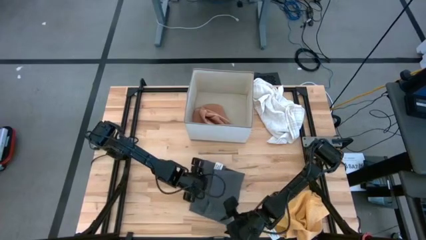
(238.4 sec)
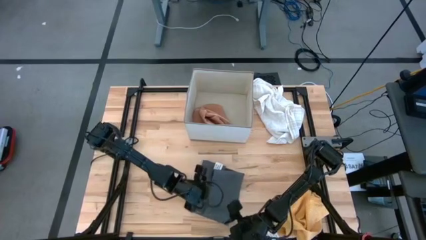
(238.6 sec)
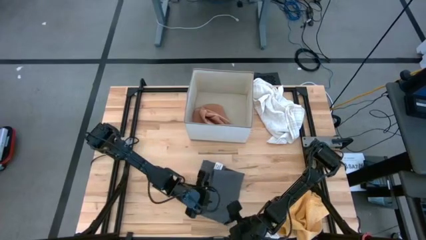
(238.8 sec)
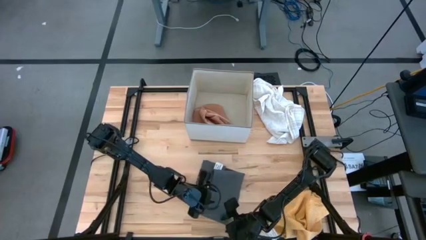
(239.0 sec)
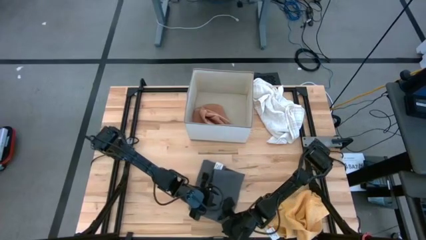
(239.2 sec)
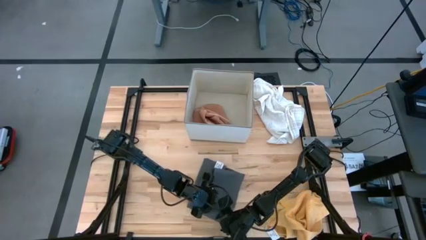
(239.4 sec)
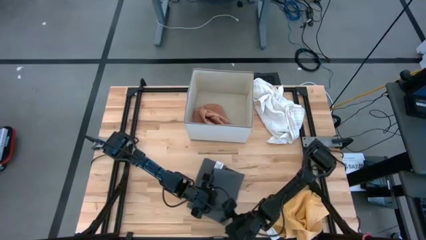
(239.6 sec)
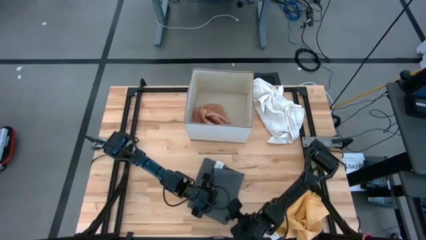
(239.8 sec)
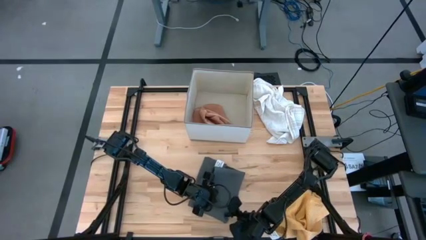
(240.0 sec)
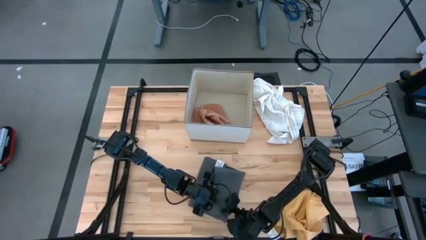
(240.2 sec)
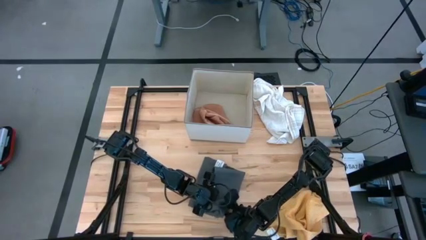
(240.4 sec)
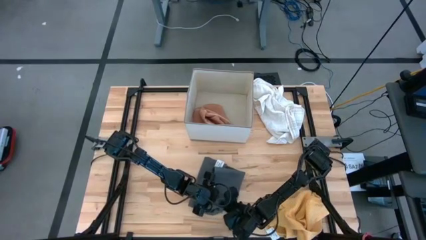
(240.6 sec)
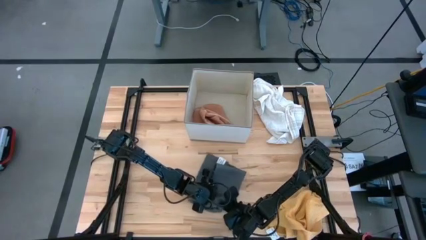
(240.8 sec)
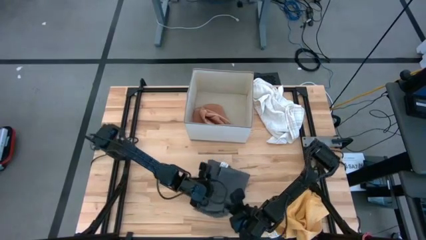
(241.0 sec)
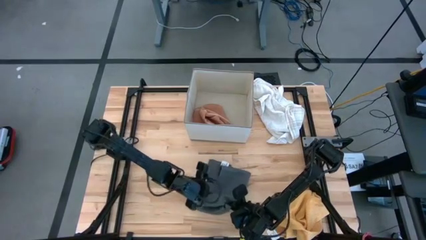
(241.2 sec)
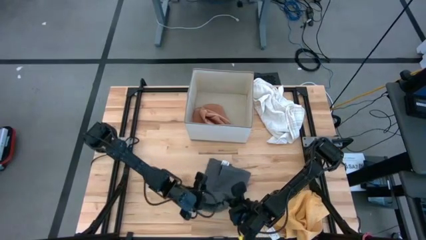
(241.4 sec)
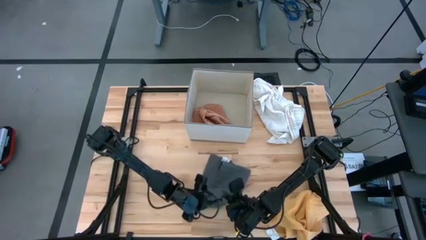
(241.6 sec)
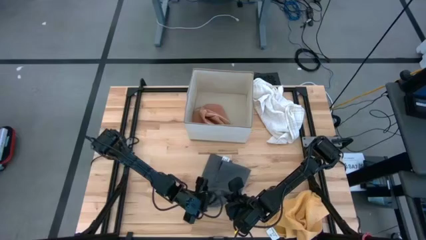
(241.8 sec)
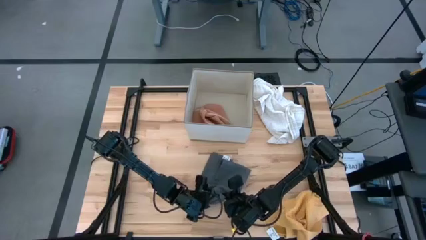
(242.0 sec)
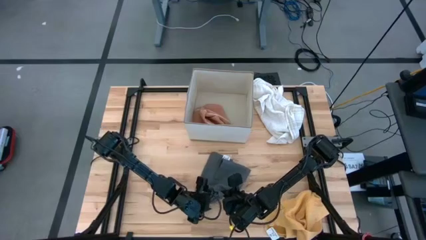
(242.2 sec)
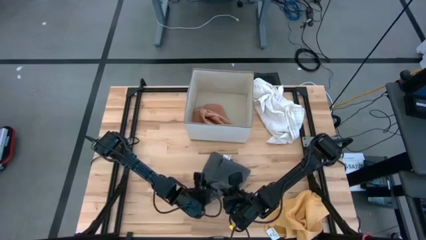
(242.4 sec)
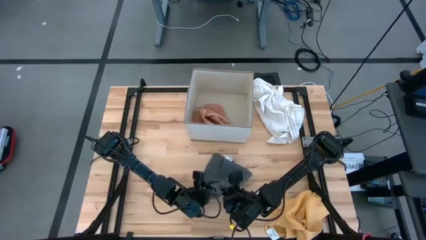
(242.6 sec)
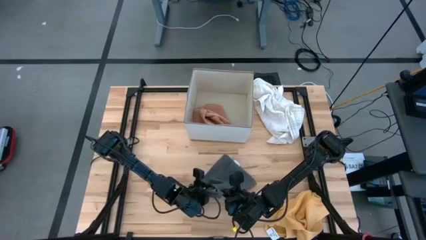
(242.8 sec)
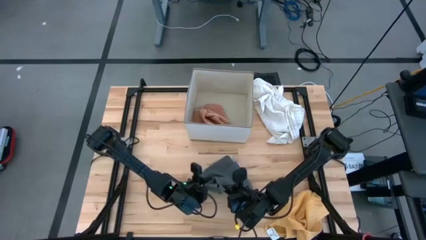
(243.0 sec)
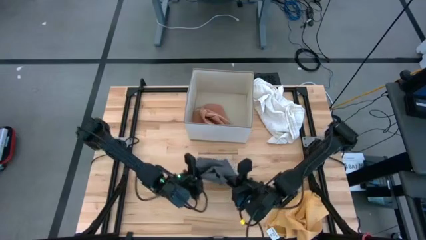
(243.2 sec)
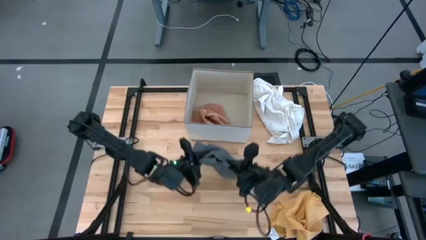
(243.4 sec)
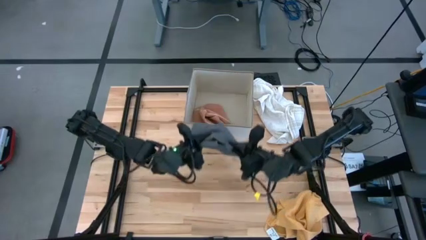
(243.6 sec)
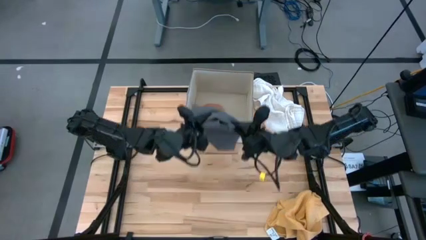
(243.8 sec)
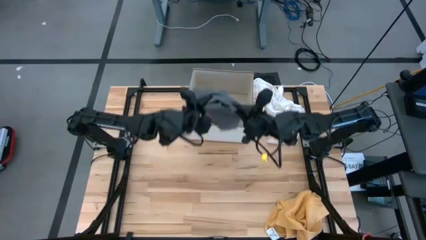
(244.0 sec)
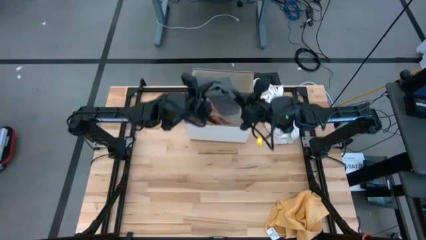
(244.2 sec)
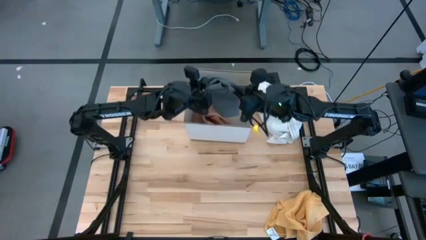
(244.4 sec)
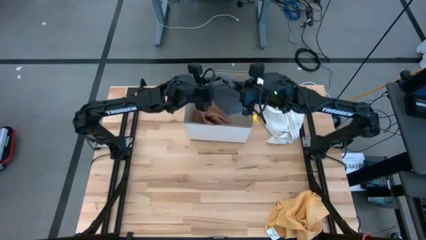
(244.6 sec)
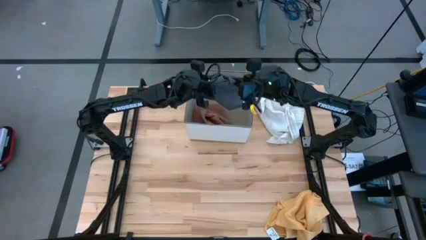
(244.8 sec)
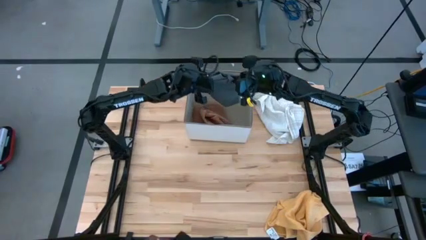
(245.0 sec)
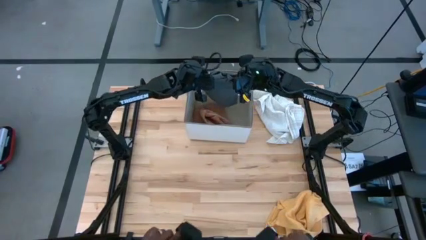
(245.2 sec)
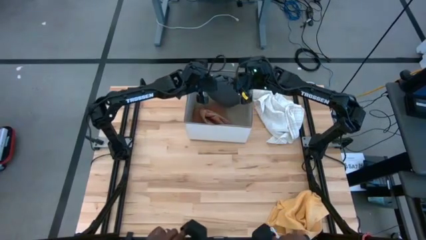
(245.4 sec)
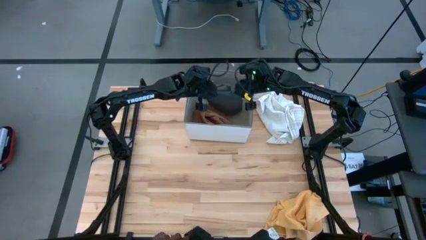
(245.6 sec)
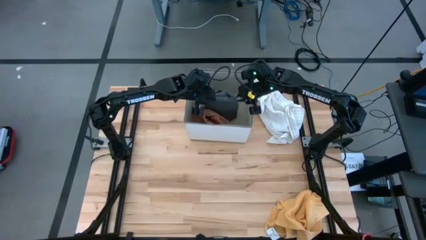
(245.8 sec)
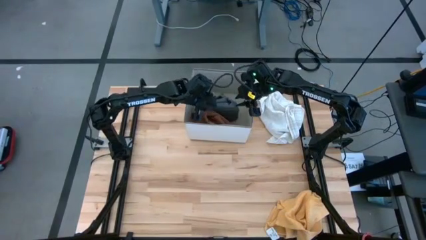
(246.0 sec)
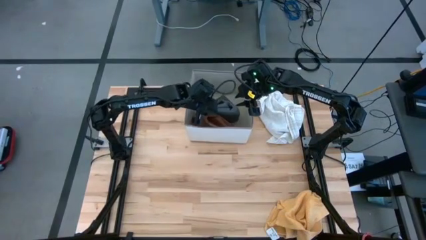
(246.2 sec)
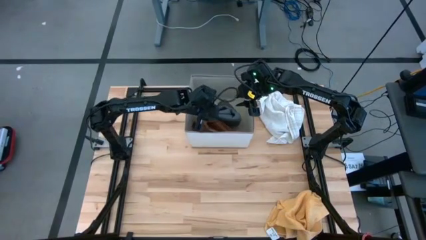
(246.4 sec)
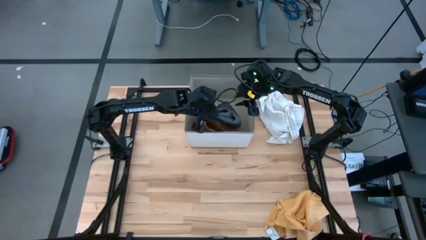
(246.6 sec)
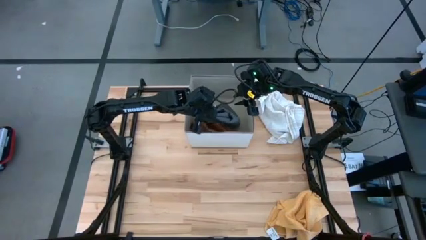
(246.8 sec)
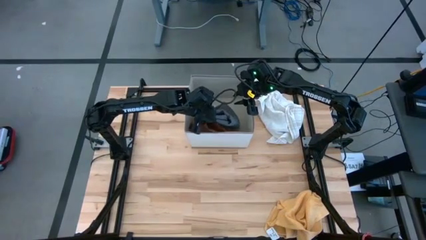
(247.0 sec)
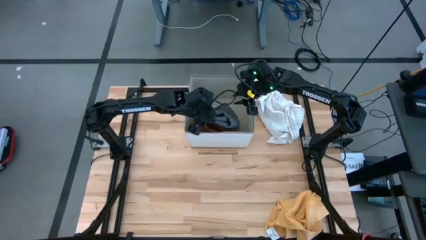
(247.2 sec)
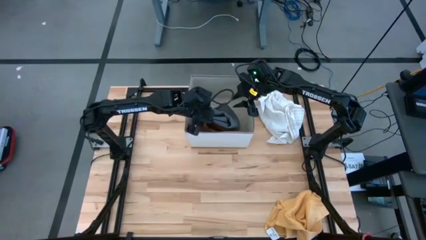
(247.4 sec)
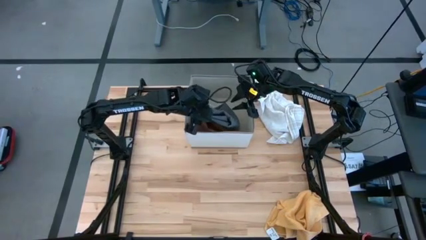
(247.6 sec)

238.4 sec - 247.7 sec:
Task: Fold towel
Put the folded gray towel into the laundry organizer

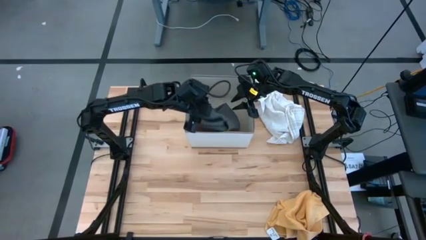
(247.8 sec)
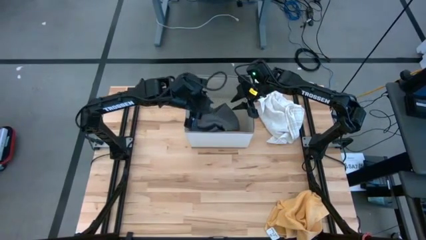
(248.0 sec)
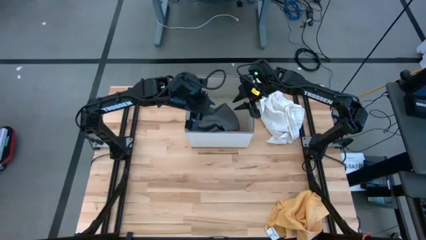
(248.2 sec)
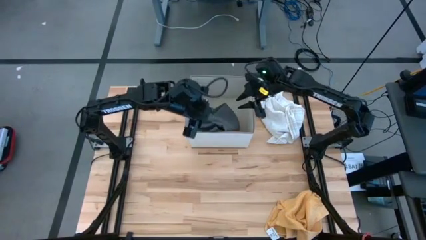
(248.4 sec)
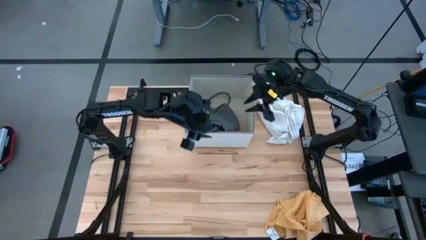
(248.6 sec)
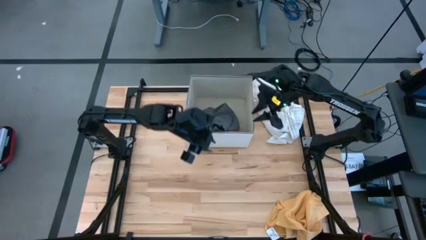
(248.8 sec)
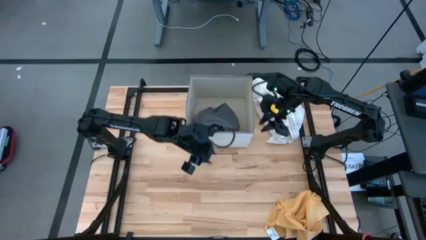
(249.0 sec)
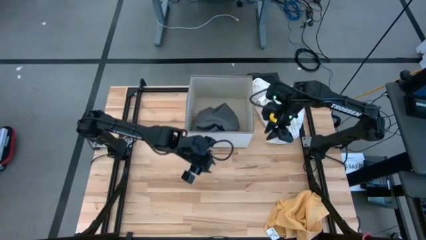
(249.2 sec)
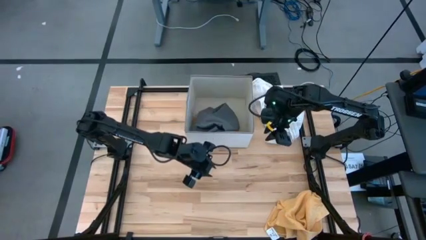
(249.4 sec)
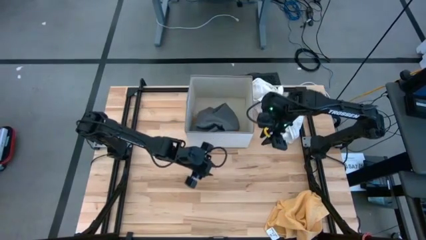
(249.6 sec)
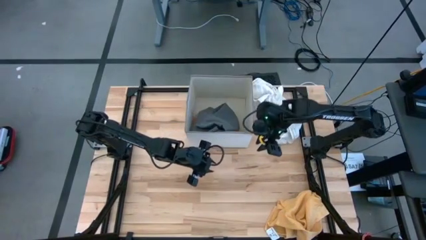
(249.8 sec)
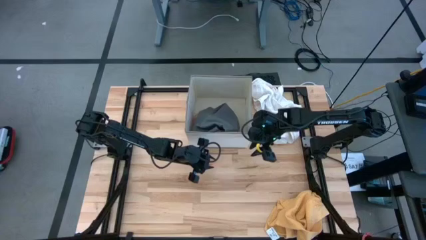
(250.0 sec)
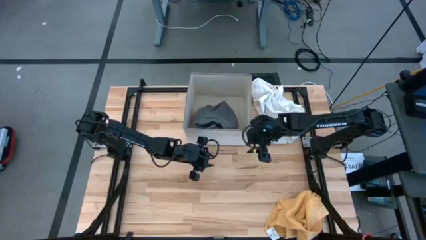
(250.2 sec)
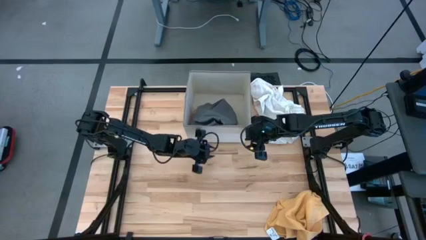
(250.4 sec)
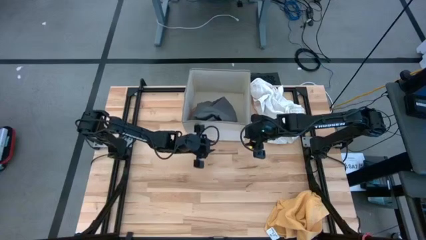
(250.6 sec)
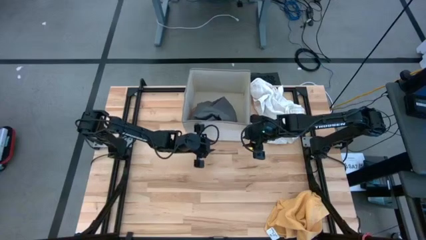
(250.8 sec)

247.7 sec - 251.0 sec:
Adjust the laundry organizer
